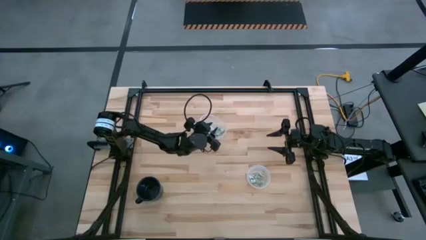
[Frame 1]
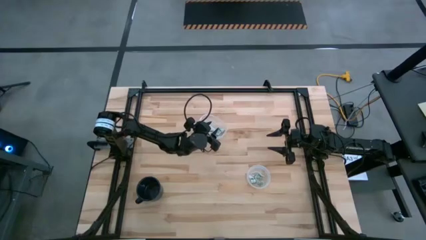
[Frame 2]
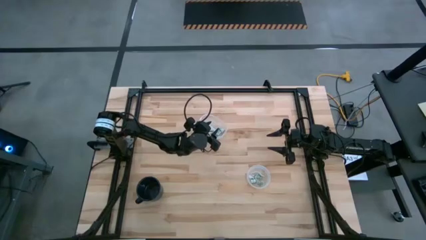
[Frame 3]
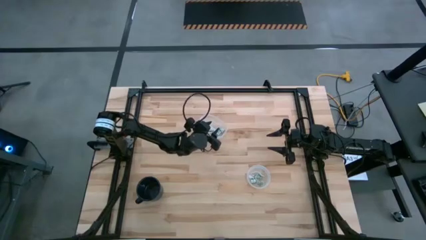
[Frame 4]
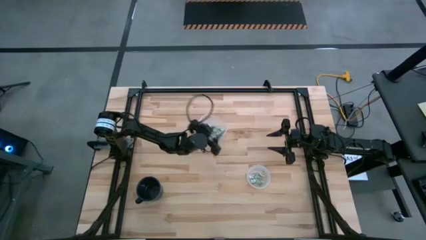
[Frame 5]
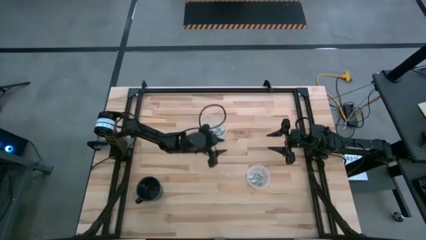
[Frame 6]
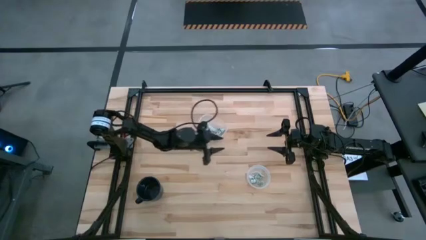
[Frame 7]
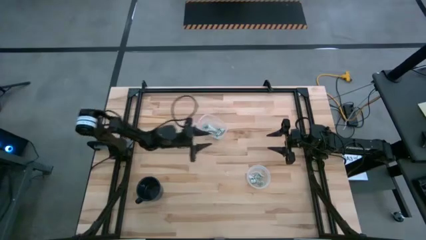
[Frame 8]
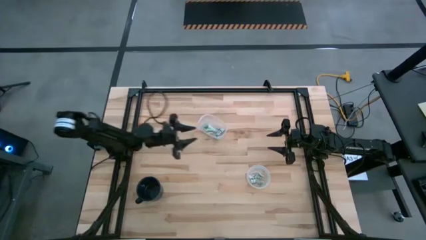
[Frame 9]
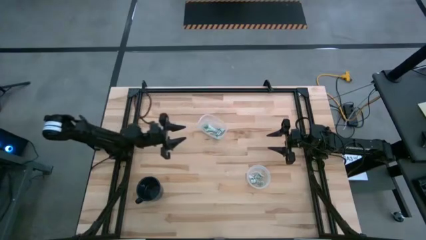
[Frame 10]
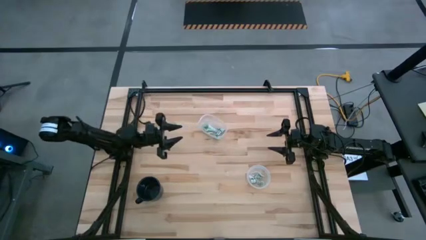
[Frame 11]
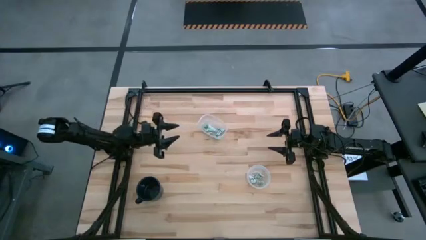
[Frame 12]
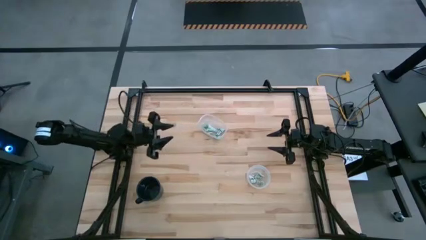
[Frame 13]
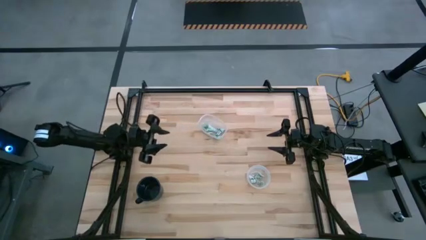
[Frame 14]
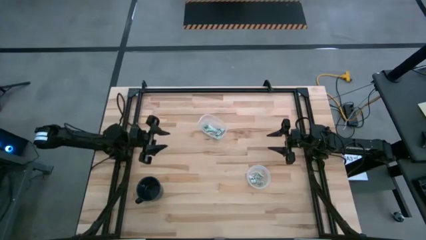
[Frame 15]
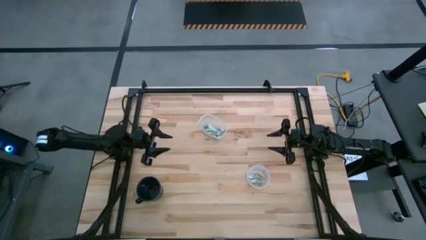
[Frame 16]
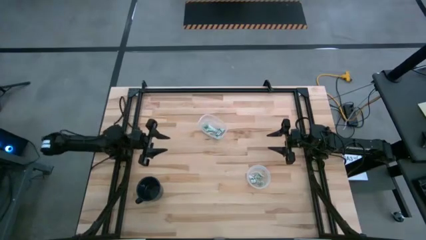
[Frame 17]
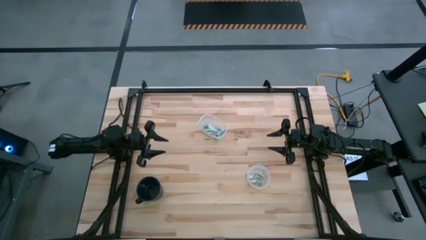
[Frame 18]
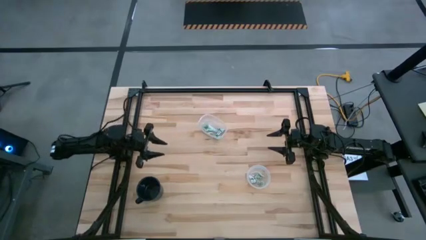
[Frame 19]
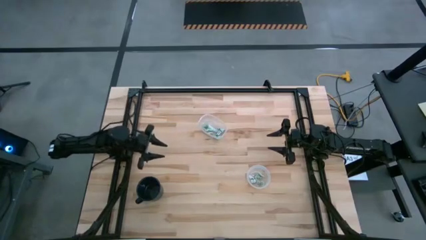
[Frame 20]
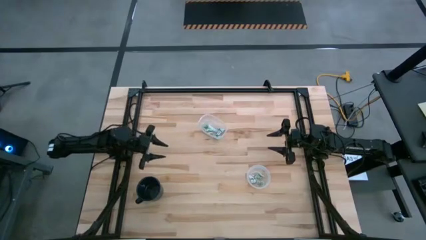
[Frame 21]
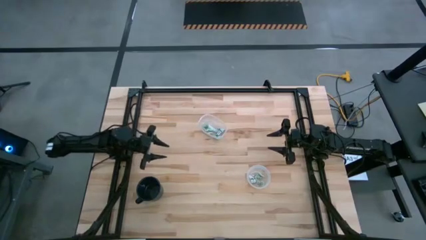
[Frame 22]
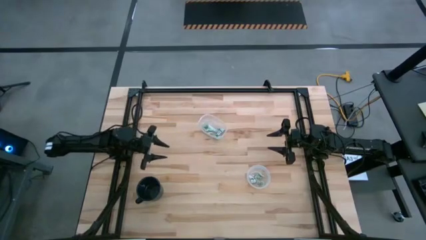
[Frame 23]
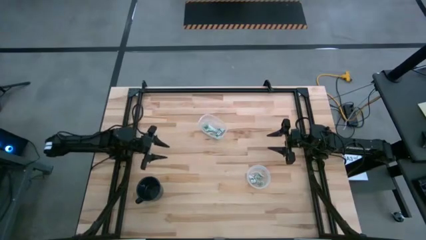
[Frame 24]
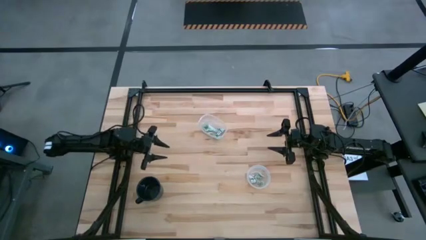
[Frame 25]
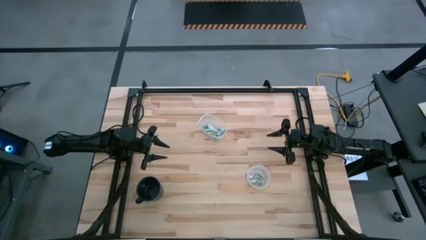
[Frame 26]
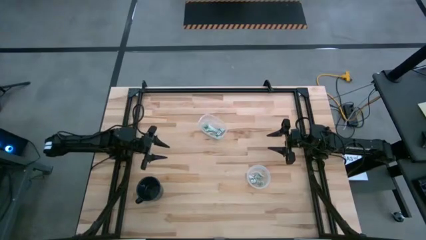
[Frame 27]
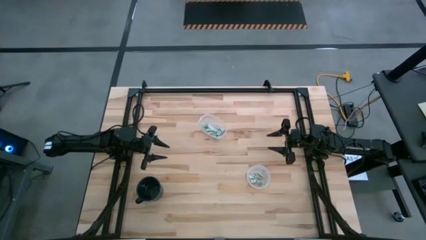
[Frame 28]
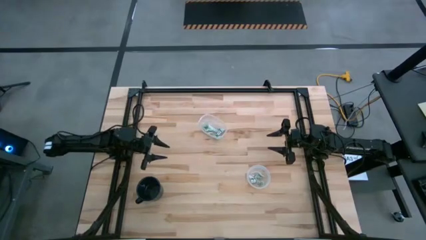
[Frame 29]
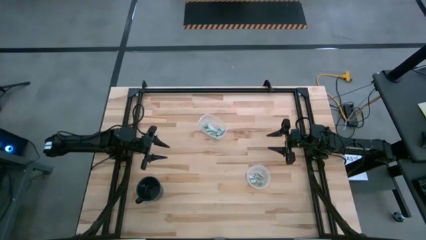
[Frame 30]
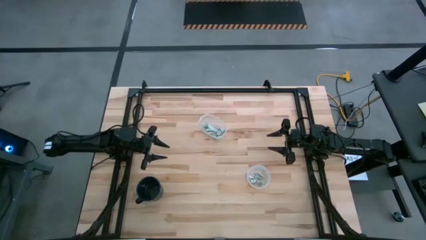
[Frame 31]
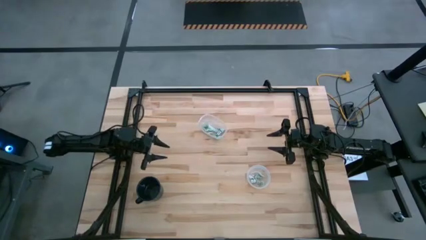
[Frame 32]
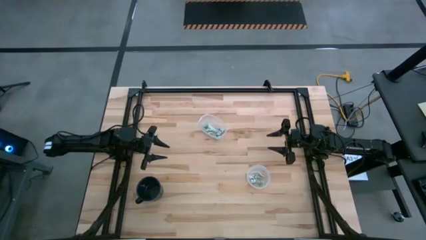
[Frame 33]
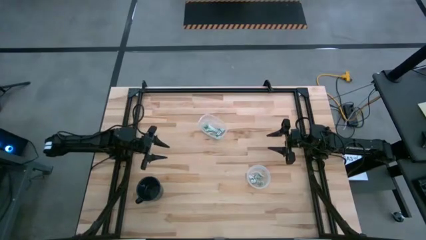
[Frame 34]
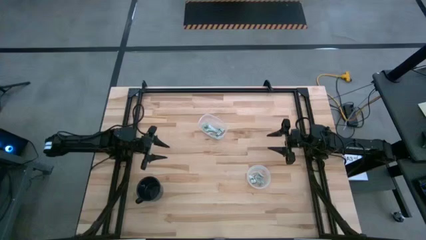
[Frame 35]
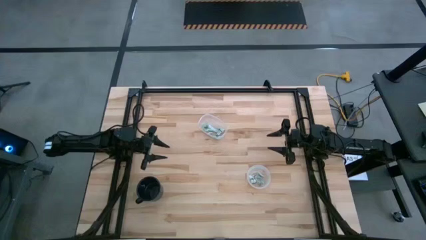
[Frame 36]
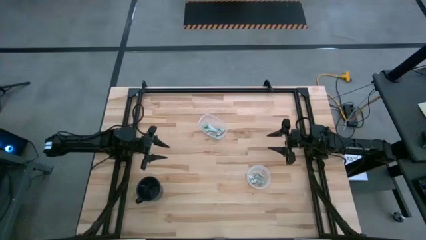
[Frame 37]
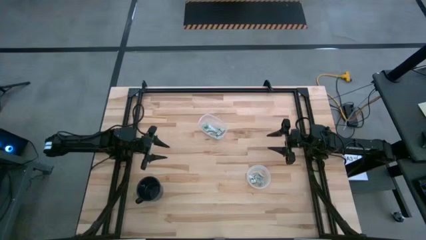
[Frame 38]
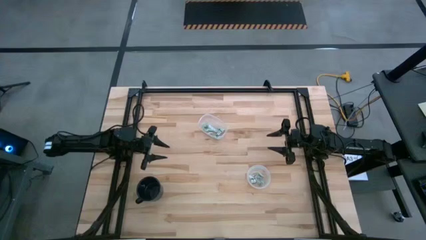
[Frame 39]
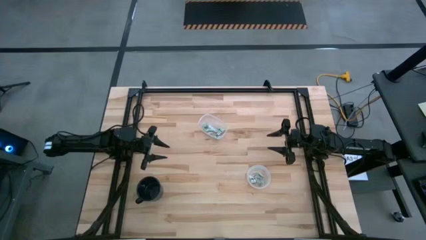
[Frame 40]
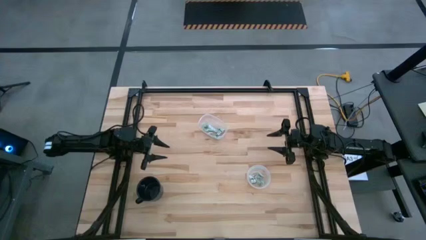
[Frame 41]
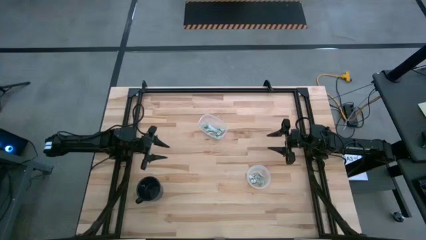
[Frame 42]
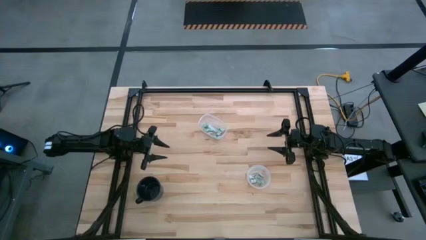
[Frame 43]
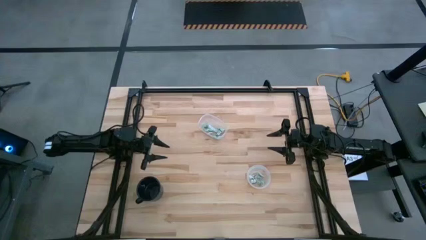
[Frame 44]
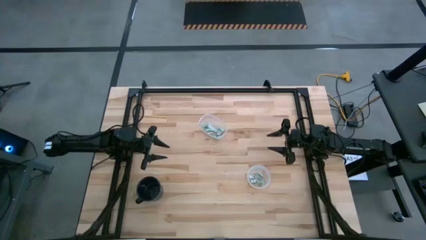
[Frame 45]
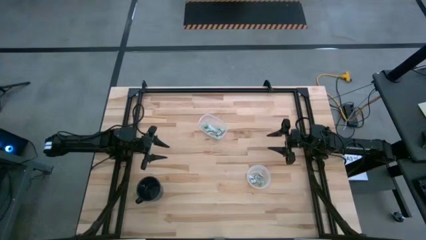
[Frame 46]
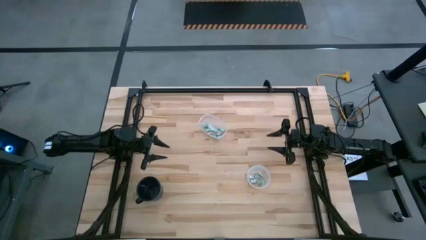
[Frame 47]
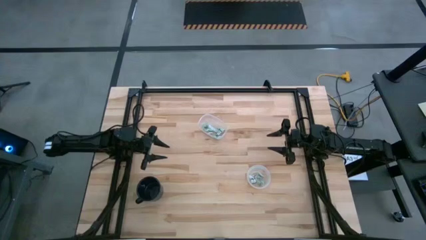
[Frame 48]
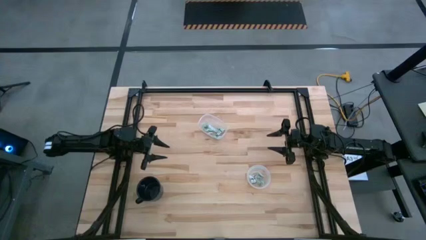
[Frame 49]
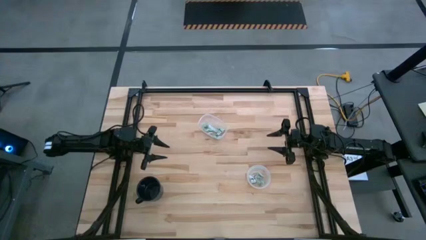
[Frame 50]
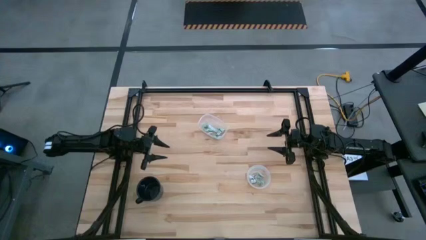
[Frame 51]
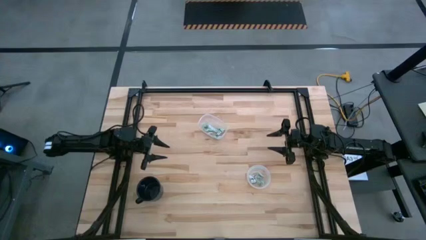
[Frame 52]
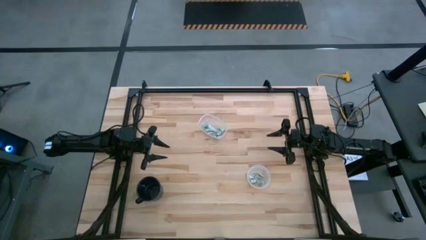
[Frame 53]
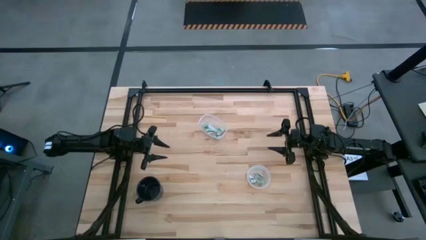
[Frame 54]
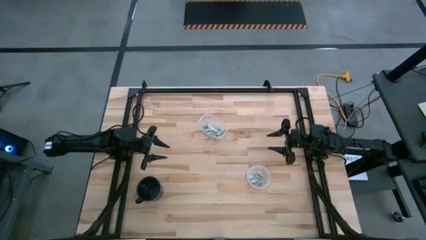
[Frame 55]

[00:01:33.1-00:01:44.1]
Task: Pick and place Stevia / Truvia into bins
Return to Home Position

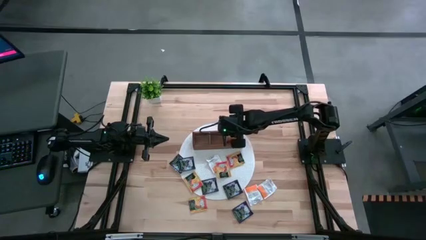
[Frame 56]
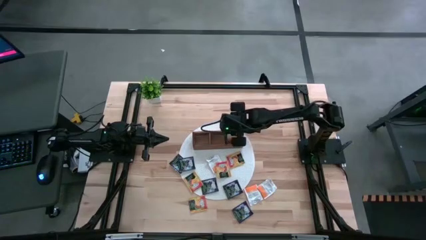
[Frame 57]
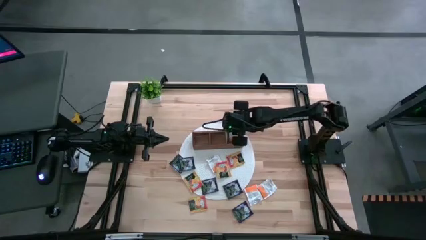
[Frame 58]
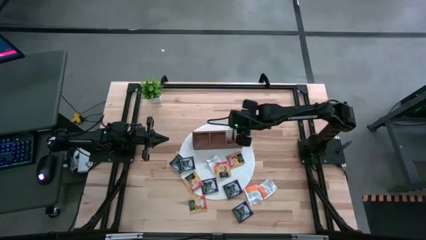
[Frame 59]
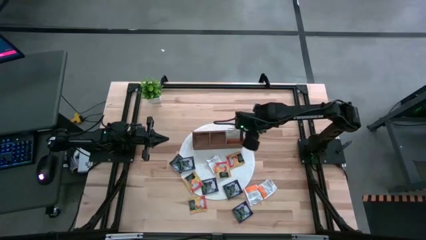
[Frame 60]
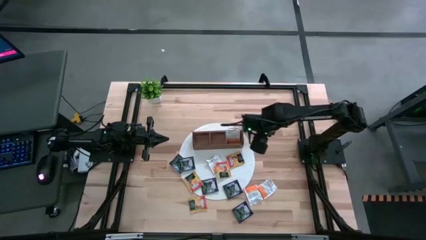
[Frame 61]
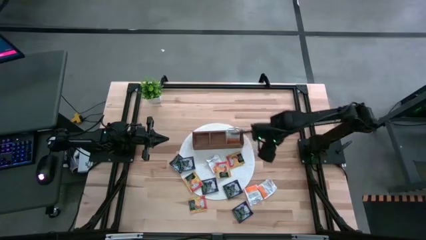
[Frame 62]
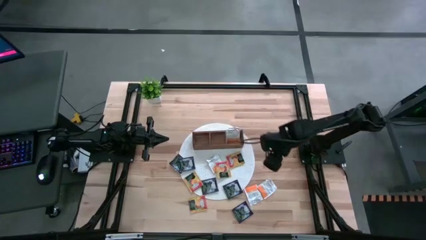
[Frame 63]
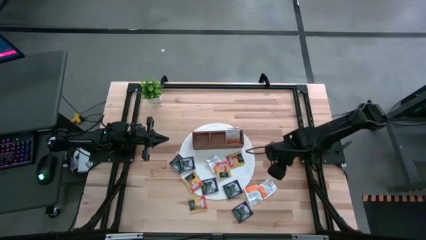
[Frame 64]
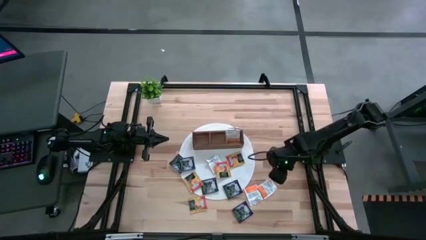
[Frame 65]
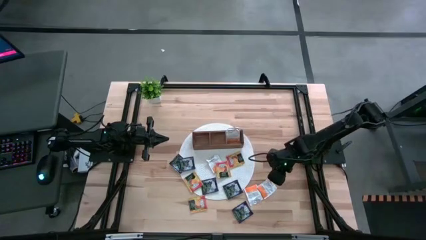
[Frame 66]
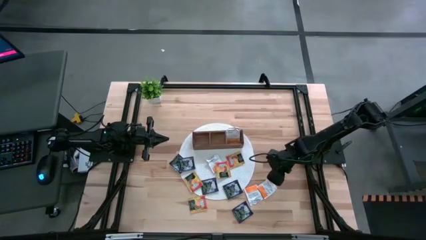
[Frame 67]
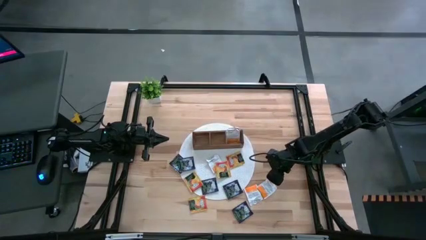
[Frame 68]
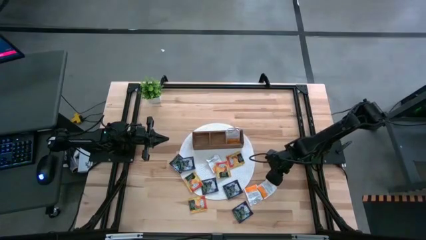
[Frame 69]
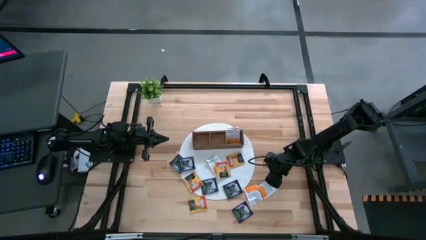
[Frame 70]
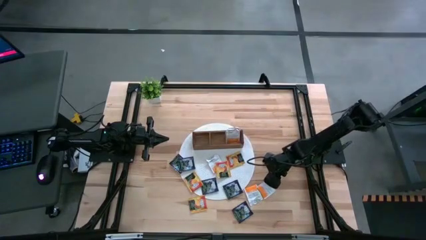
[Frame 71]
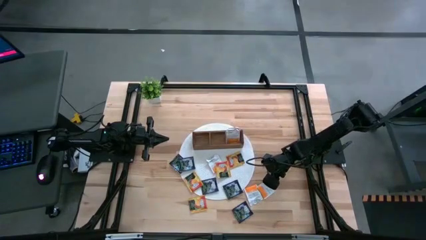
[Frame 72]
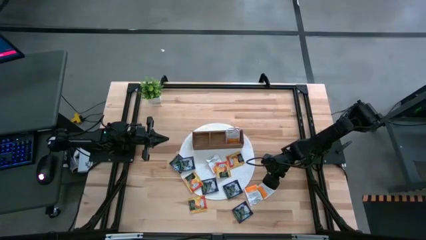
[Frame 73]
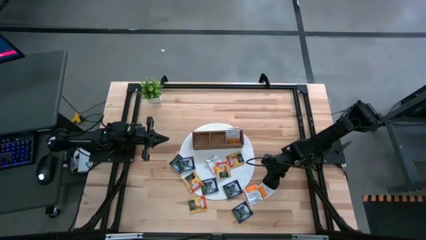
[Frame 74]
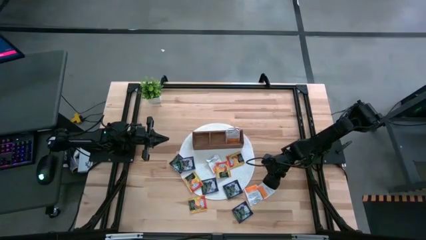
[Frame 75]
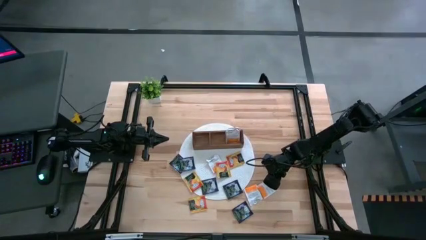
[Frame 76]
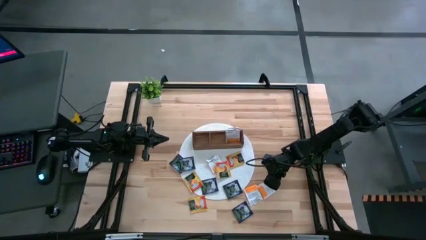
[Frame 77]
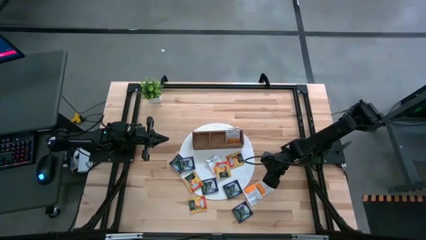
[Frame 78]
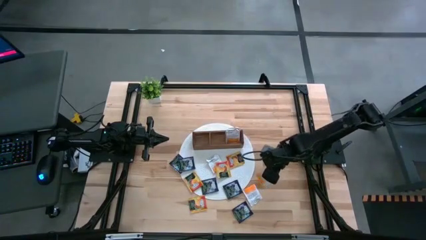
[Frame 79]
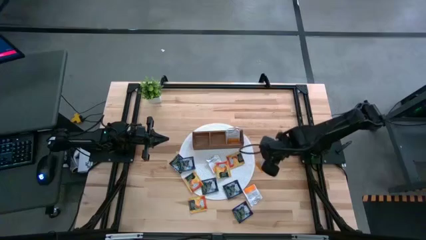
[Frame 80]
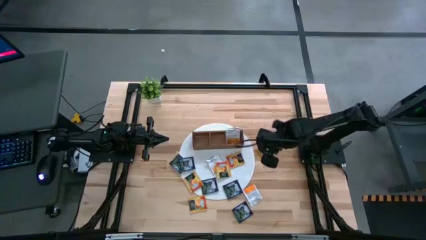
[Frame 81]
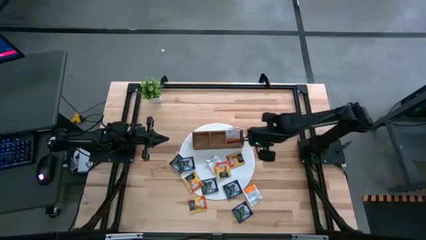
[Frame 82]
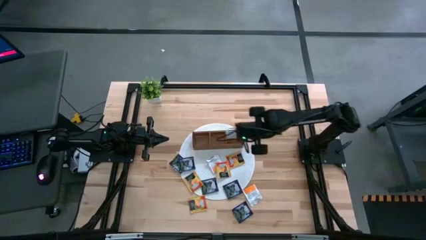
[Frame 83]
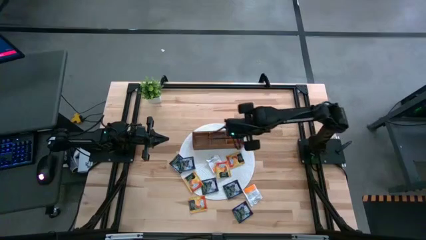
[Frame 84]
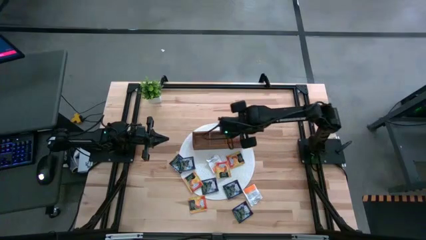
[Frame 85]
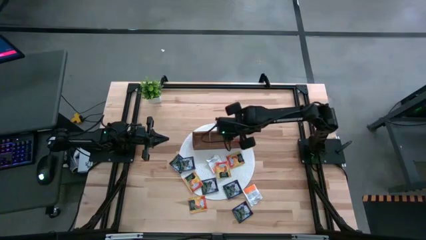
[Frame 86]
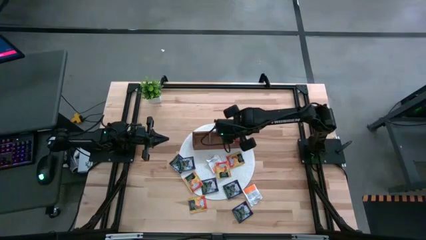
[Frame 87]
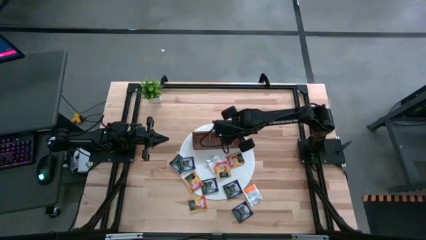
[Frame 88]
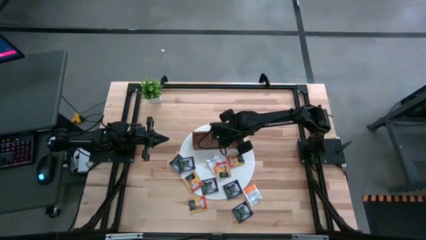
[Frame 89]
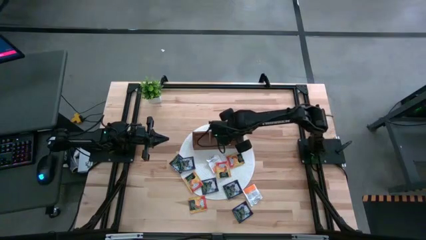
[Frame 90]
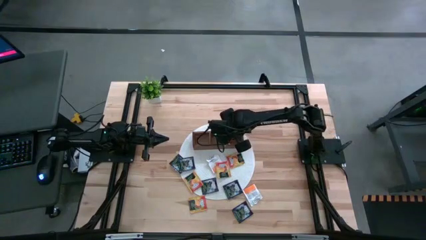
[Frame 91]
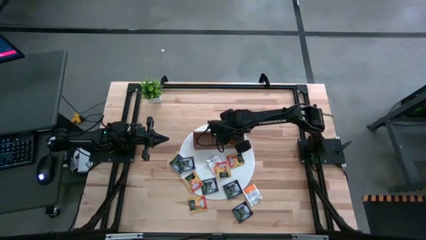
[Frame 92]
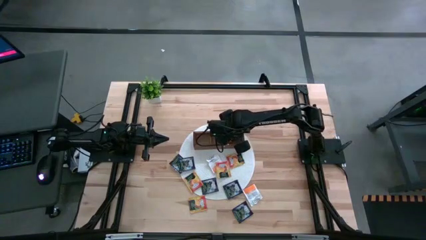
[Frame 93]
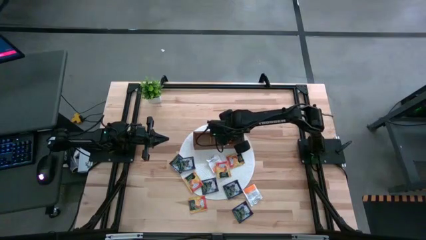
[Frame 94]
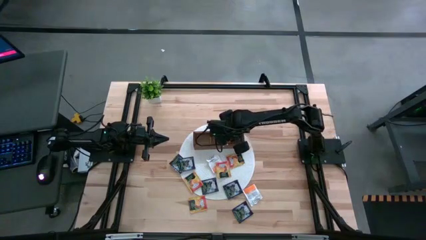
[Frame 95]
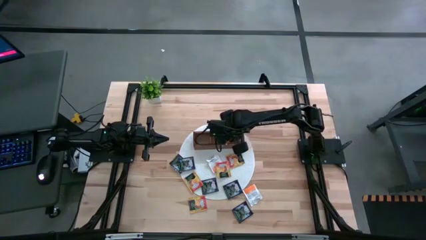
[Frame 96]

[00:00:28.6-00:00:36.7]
Task: Pick & Place Tea
Put the white tea bag into the right section of the wooden organizer
